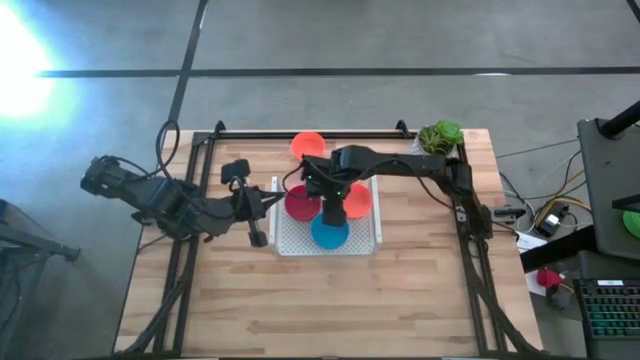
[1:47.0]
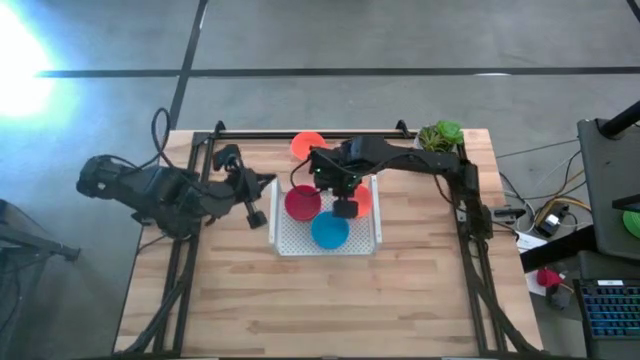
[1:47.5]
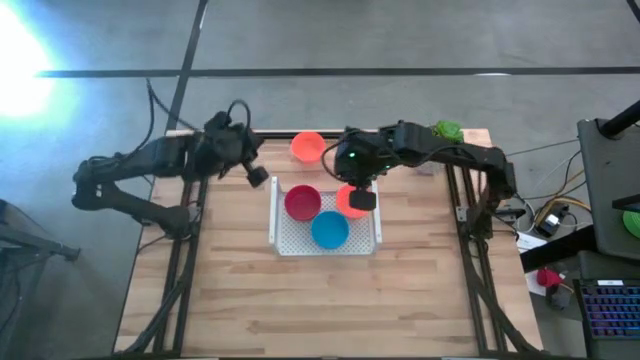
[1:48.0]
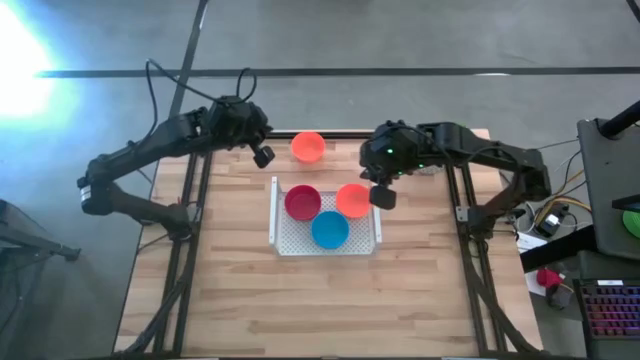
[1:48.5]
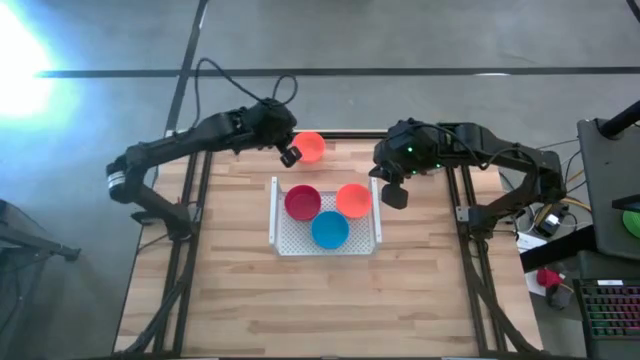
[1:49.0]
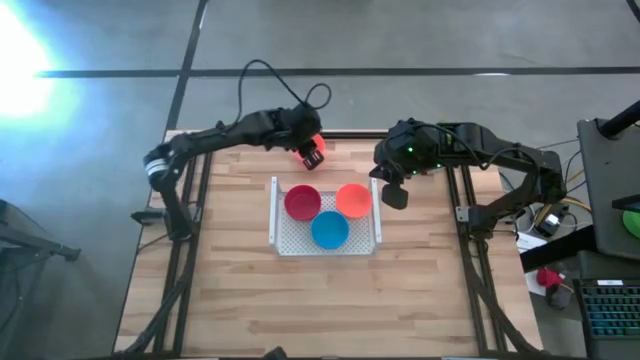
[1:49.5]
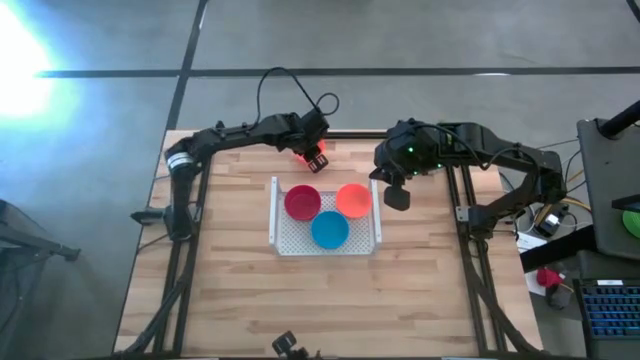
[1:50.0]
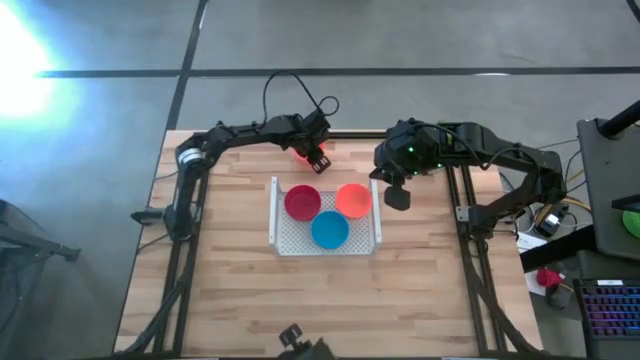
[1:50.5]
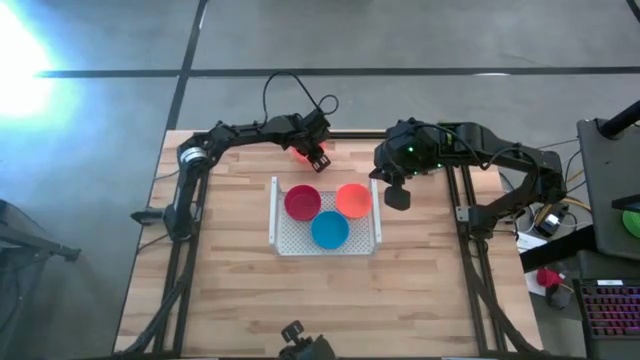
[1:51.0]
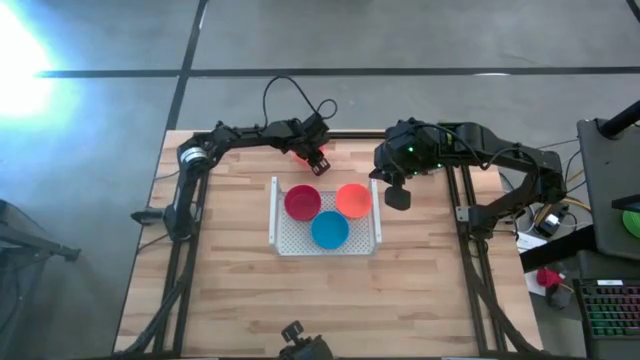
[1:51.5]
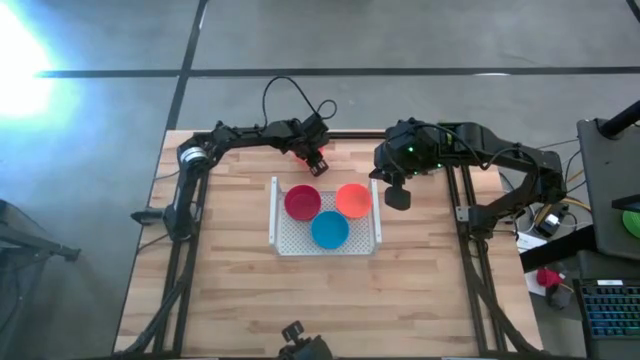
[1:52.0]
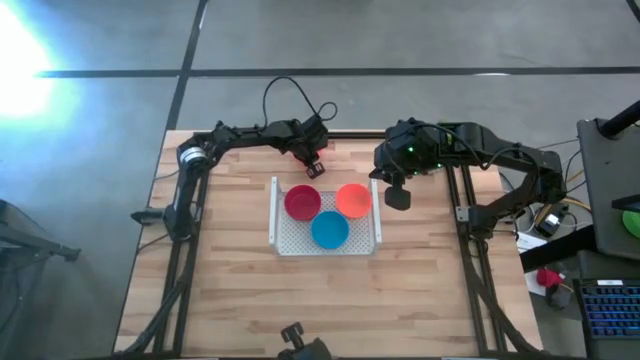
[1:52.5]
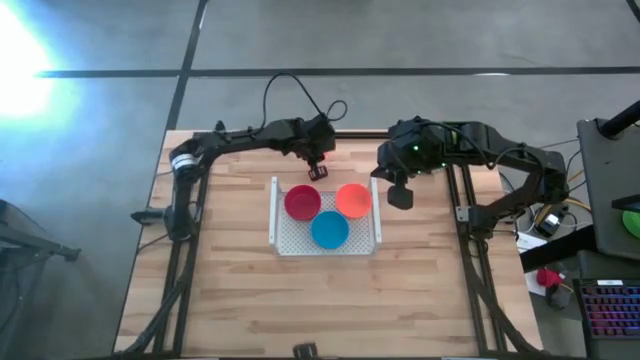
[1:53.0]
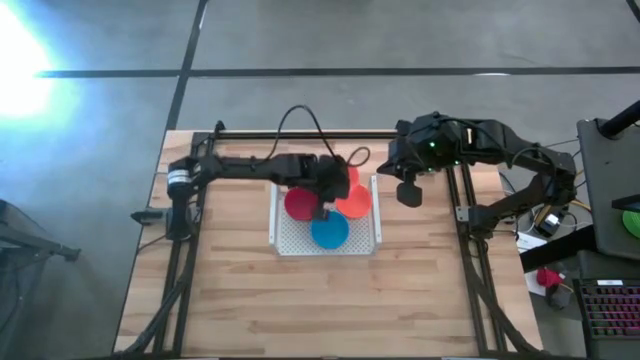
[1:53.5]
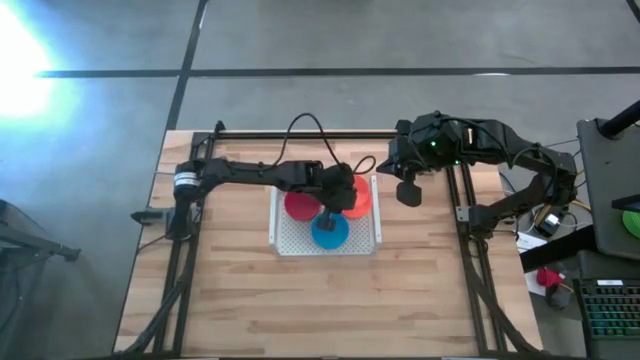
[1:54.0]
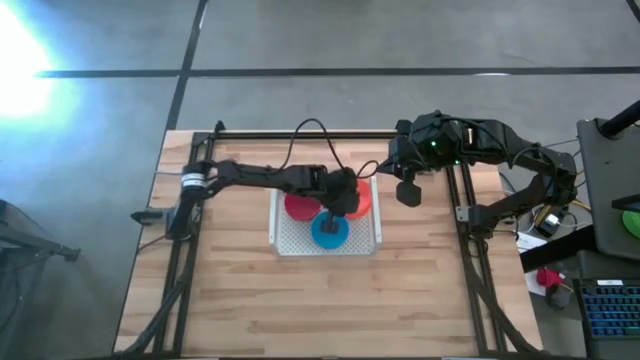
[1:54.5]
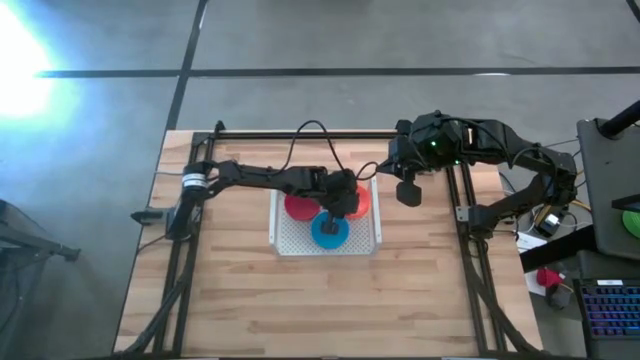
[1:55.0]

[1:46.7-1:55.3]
Task: Pick & Place Mini bowls
Stack the orange bowl on top of the orange bowls on the shelf

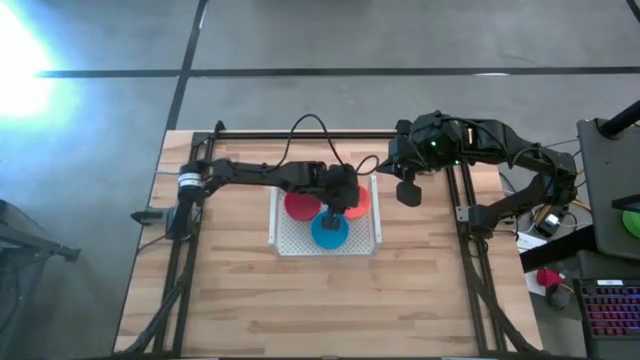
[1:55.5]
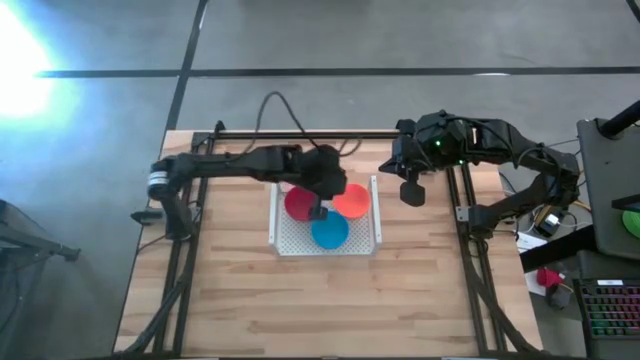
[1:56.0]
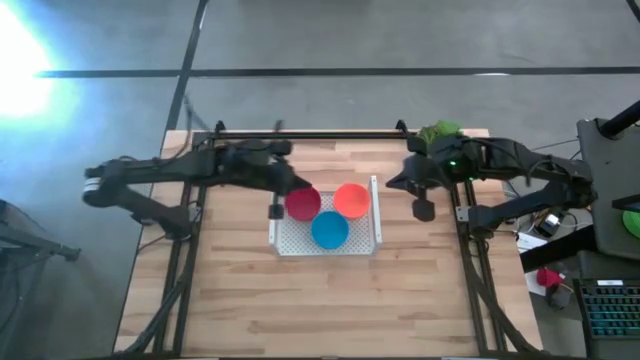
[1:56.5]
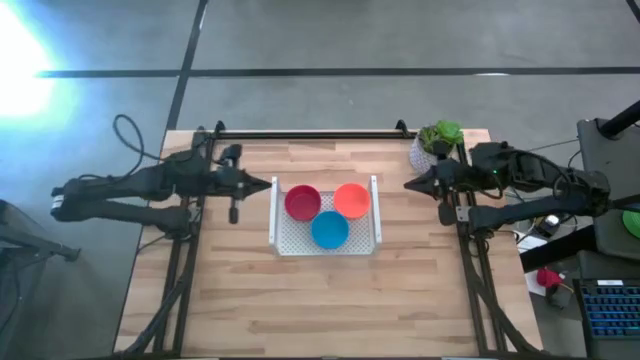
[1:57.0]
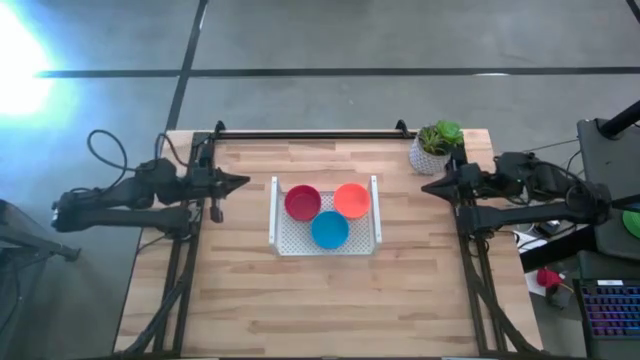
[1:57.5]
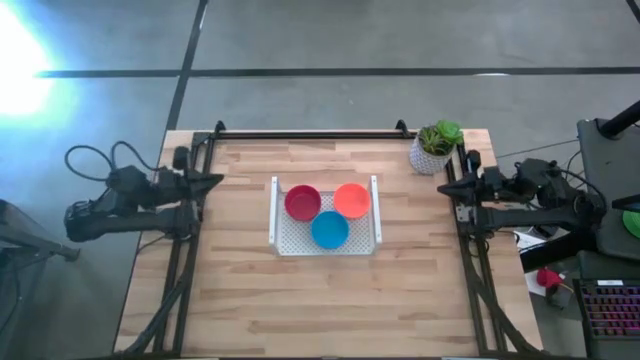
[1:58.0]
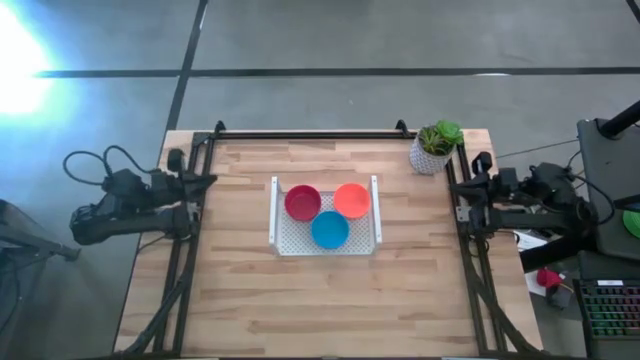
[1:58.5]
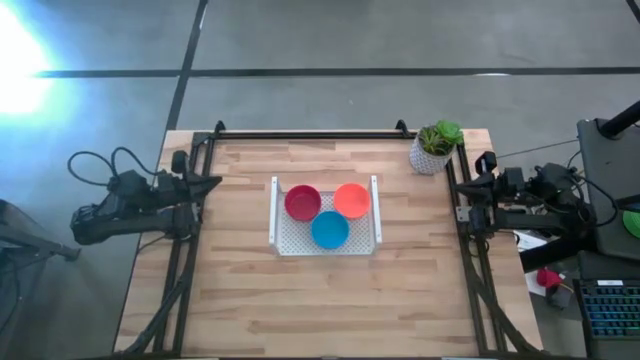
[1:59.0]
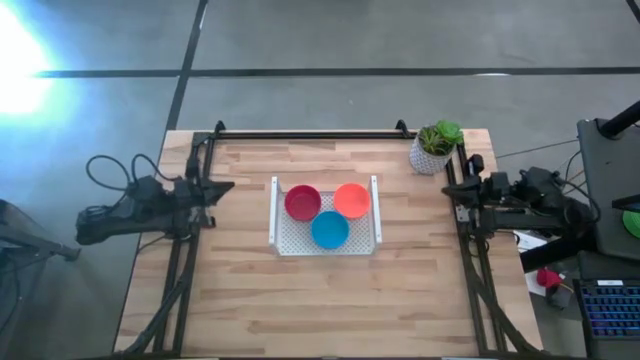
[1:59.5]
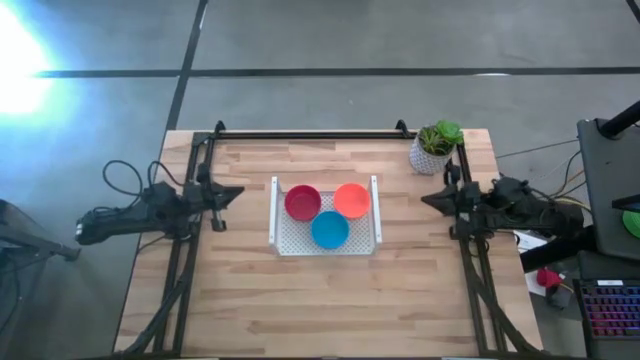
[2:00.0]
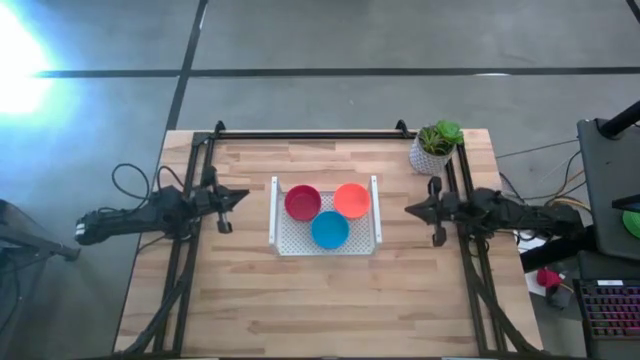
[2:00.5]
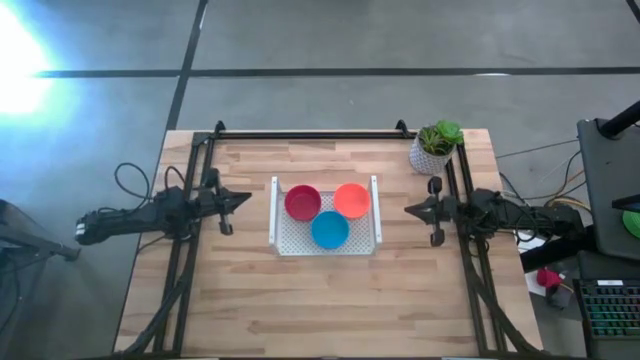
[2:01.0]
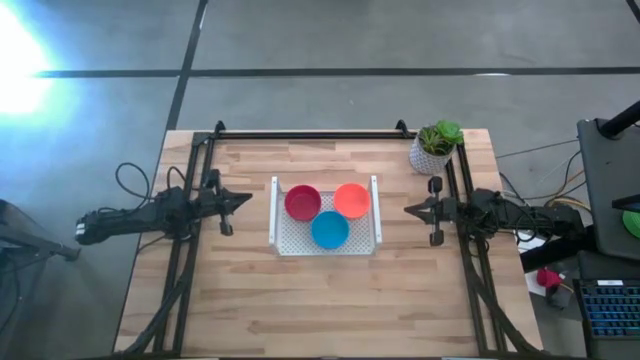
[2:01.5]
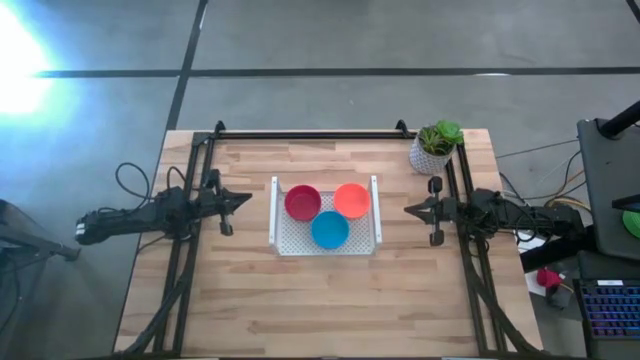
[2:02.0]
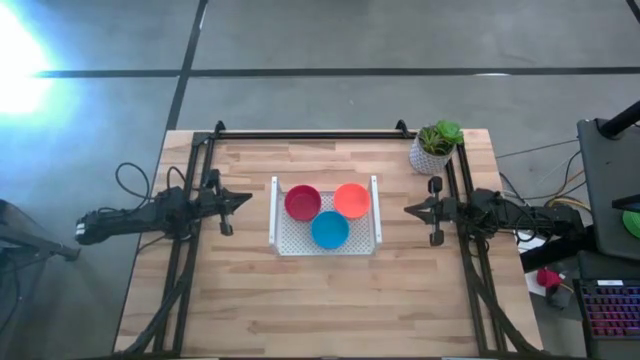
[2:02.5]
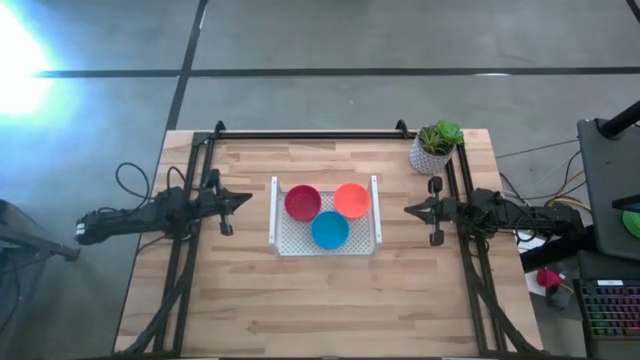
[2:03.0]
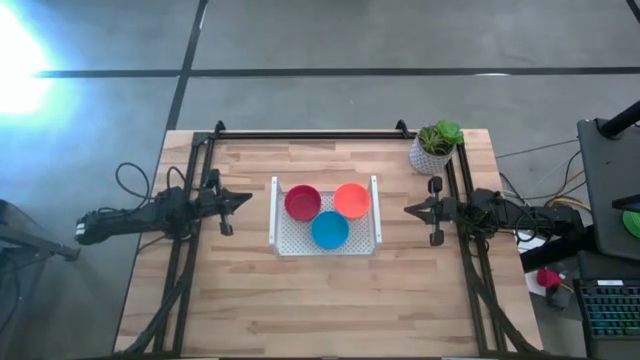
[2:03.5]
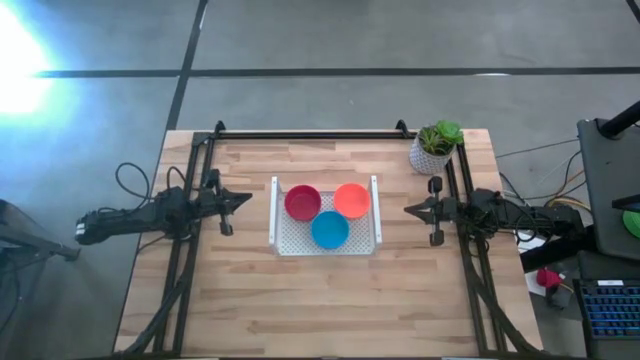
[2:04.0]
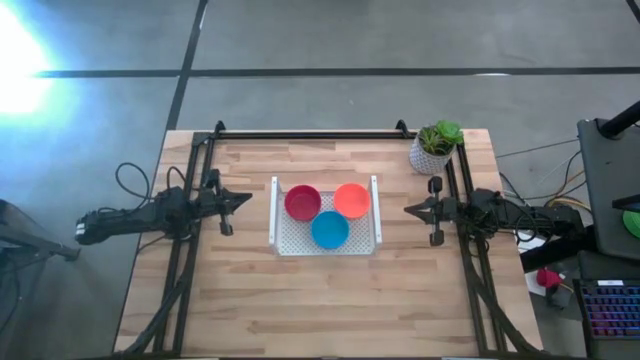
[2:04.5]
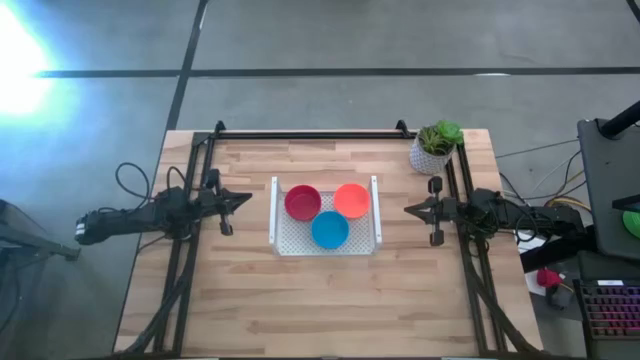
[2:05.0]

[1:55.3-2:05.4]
Return to Home Position

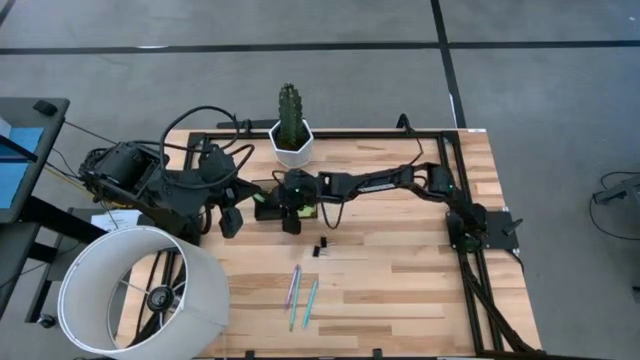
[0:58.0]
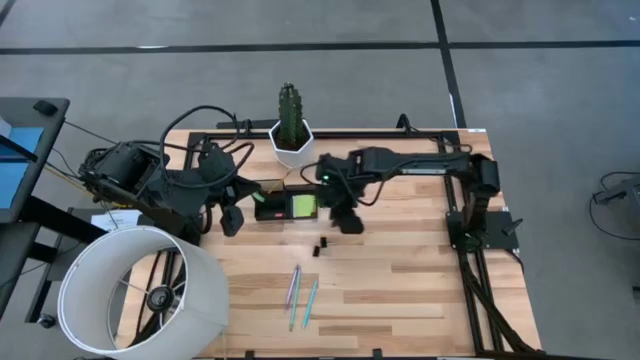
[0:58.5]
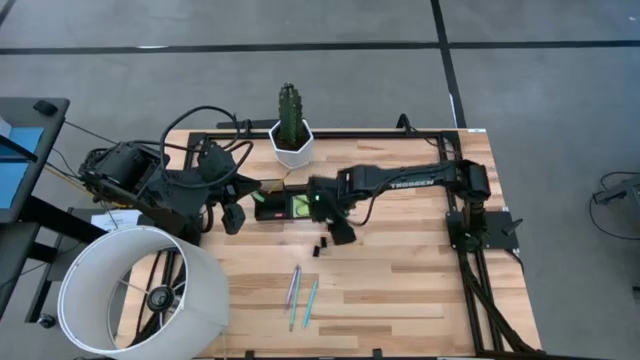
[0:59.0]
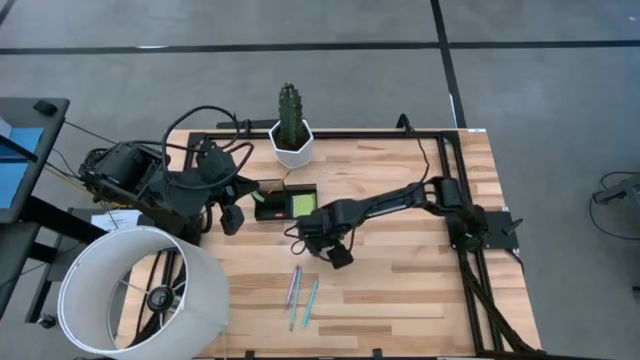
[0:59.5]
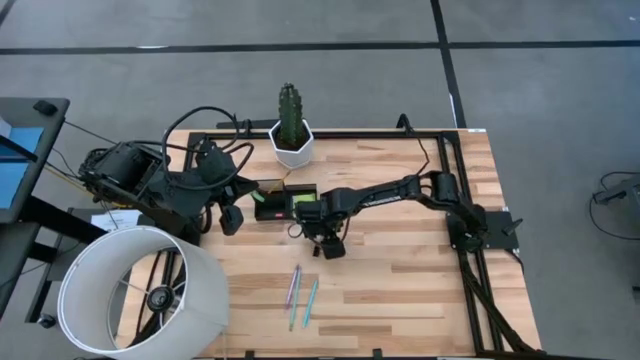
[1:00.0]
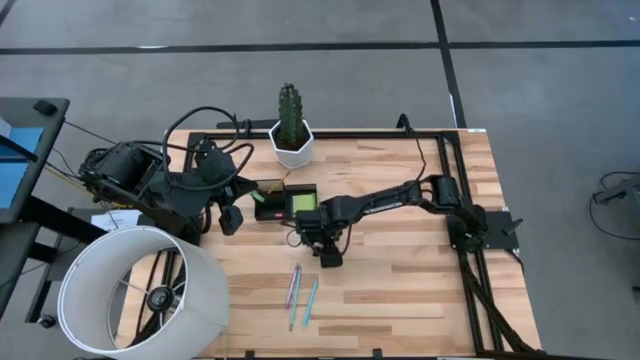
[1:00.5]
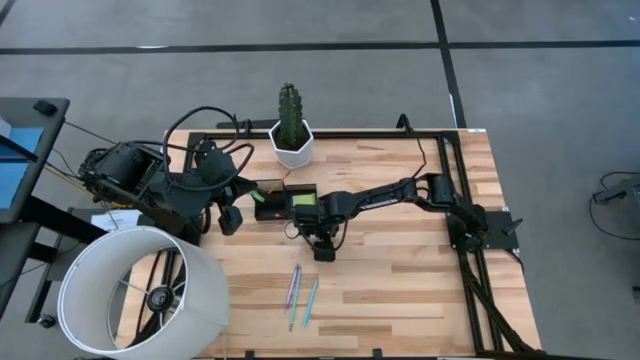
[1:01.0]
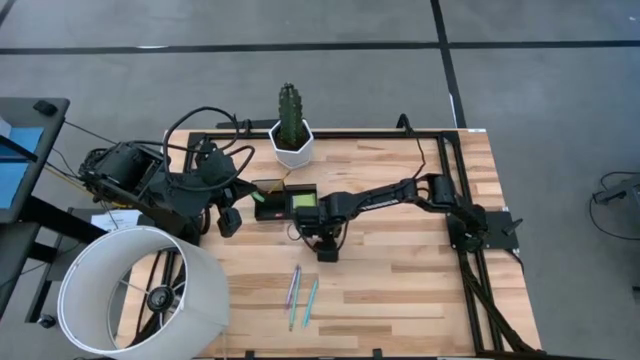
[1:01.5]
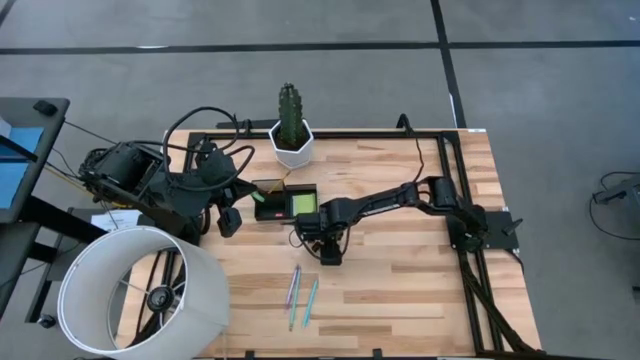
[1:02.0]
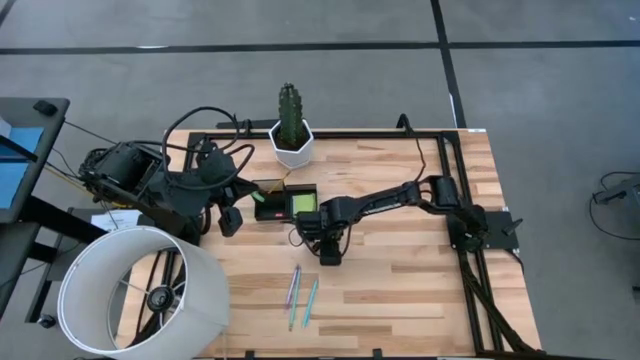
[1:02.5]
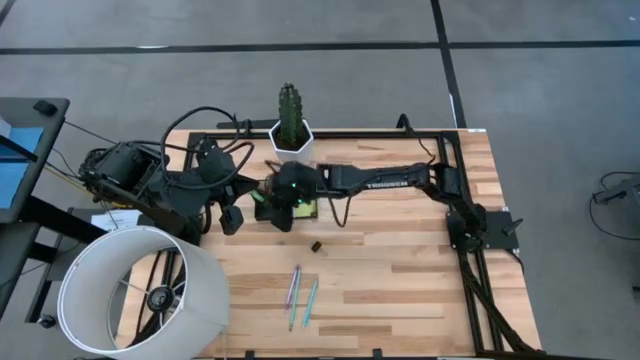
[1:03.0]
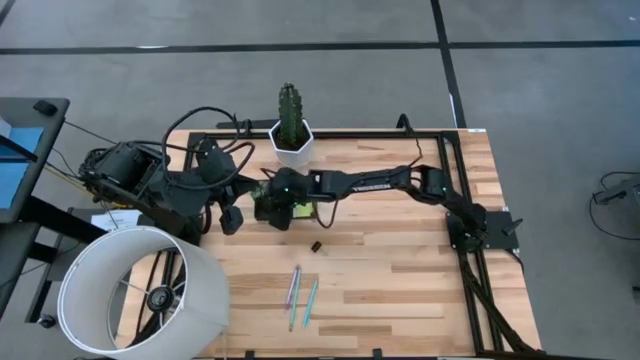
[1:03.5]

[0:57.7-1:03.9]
Task: Pick and place office supplies into organizer
Put the right black binder clip into the black mesh organizer
